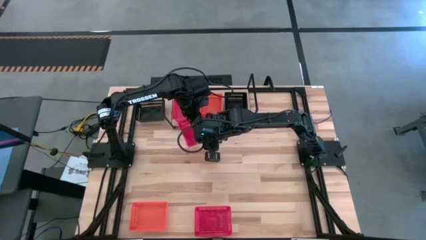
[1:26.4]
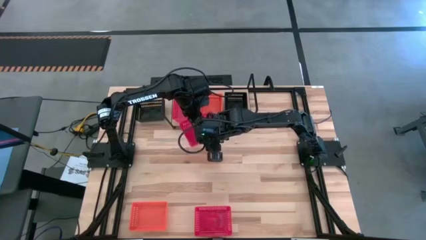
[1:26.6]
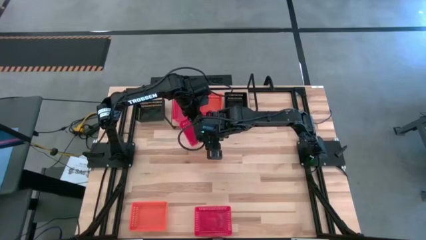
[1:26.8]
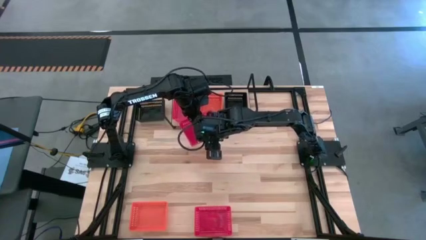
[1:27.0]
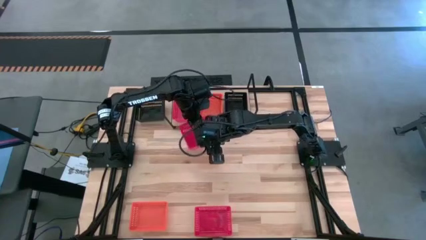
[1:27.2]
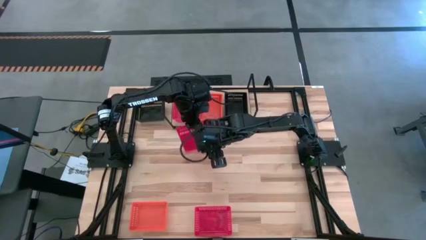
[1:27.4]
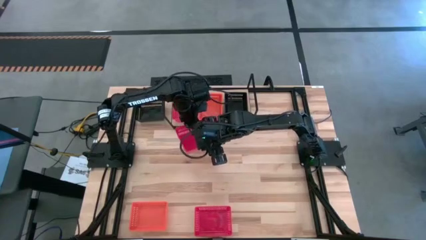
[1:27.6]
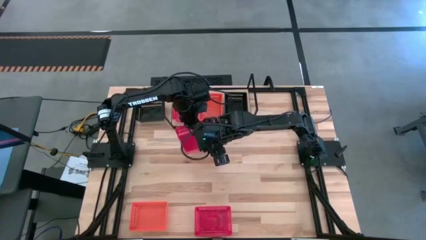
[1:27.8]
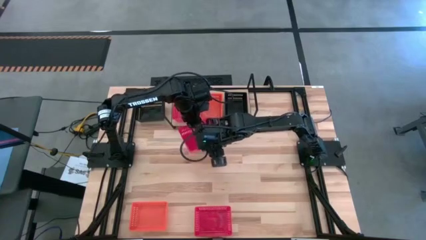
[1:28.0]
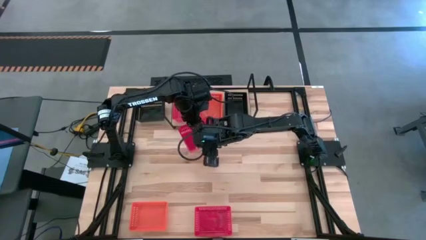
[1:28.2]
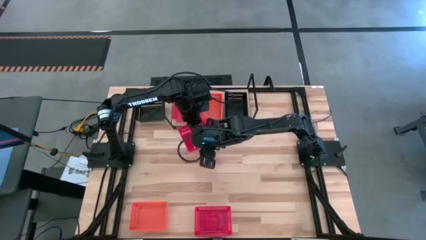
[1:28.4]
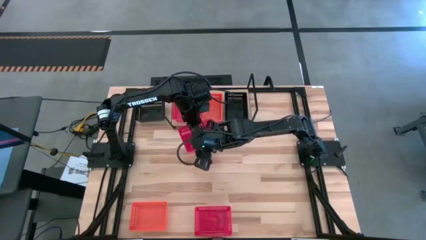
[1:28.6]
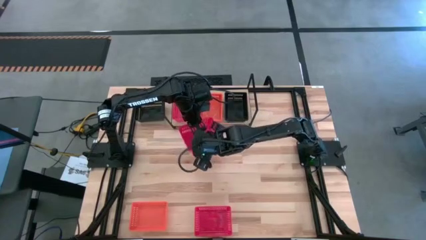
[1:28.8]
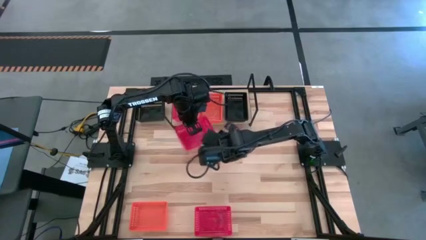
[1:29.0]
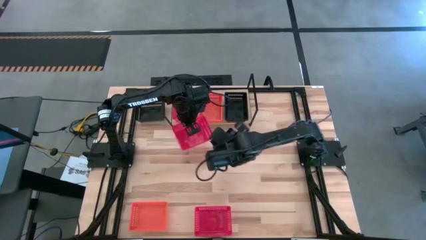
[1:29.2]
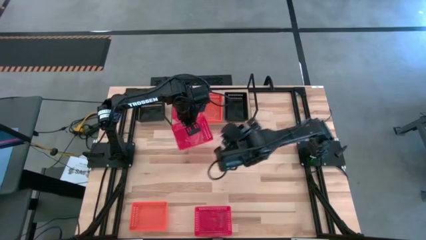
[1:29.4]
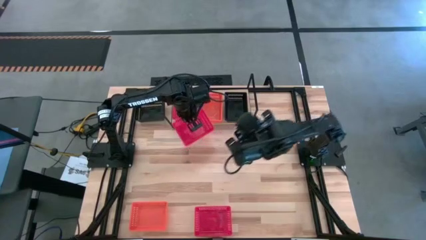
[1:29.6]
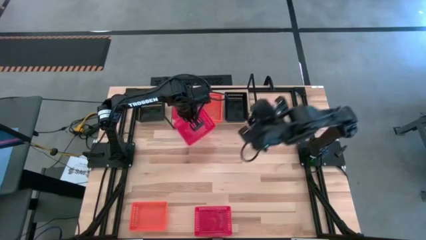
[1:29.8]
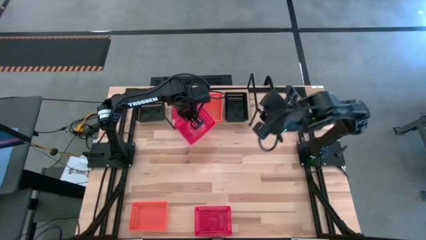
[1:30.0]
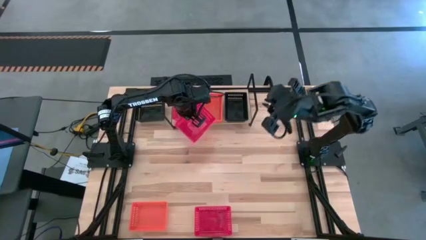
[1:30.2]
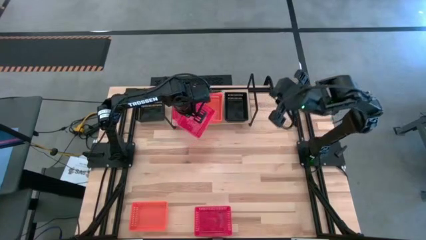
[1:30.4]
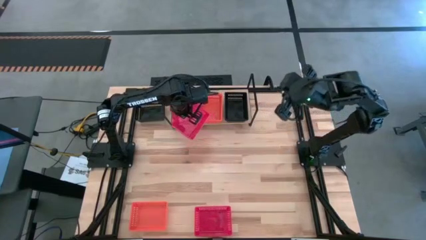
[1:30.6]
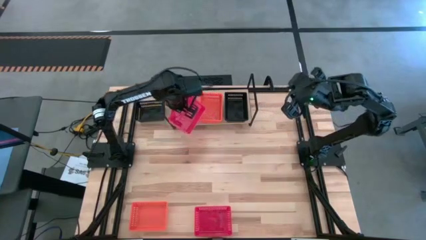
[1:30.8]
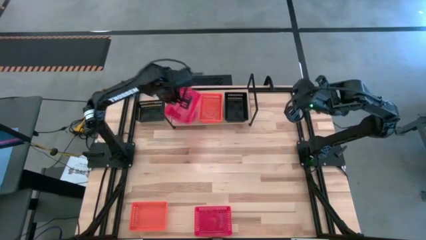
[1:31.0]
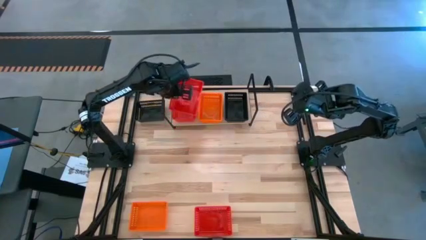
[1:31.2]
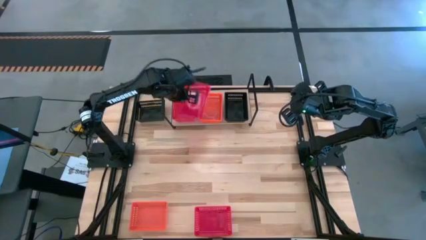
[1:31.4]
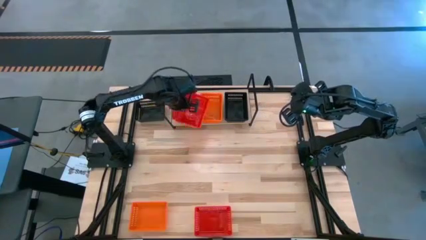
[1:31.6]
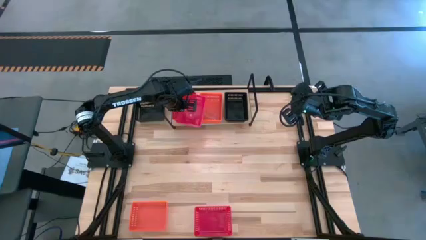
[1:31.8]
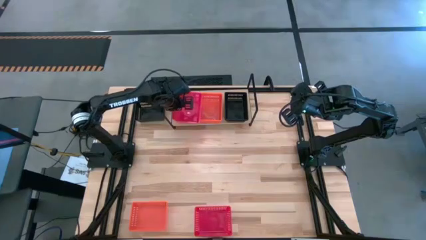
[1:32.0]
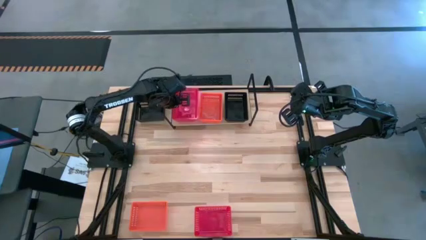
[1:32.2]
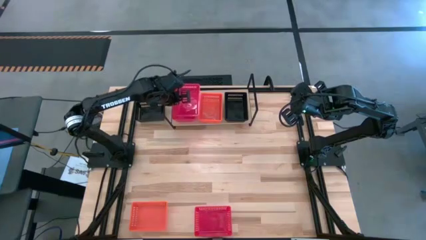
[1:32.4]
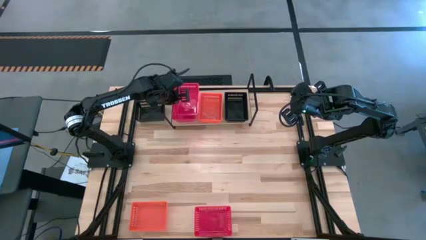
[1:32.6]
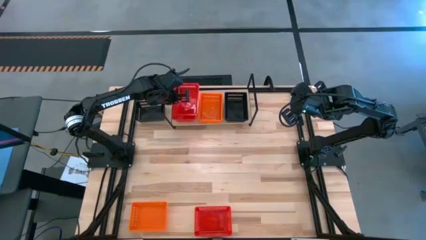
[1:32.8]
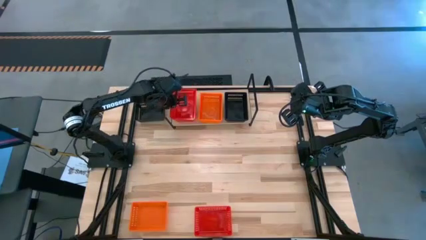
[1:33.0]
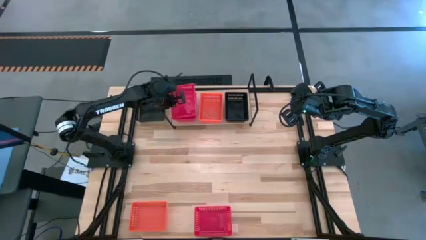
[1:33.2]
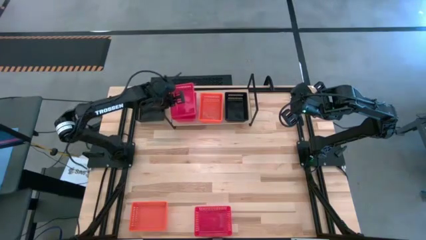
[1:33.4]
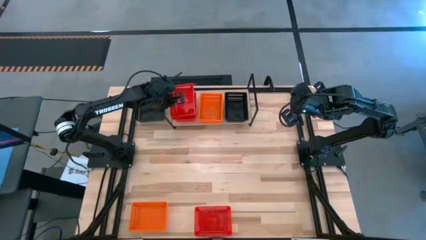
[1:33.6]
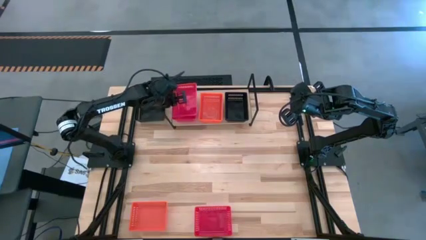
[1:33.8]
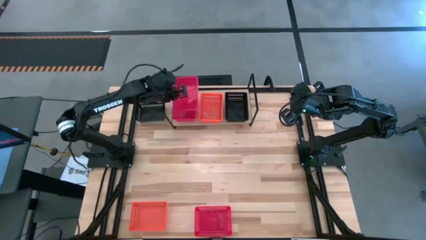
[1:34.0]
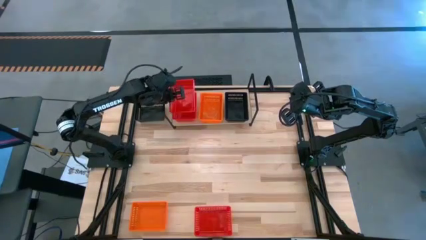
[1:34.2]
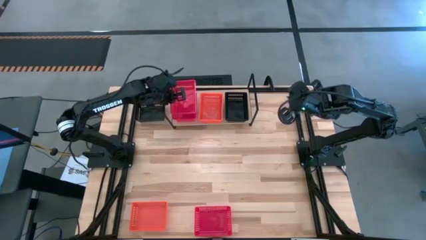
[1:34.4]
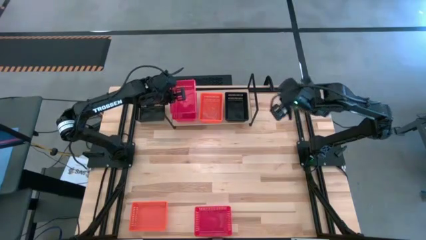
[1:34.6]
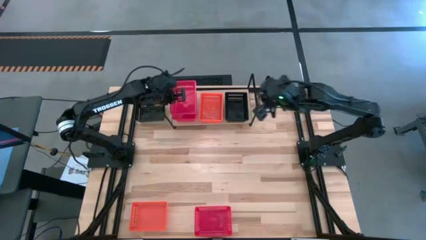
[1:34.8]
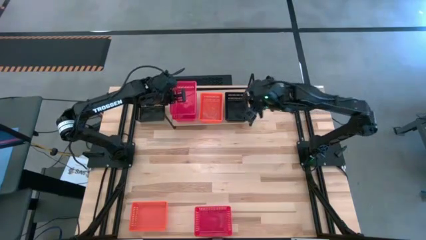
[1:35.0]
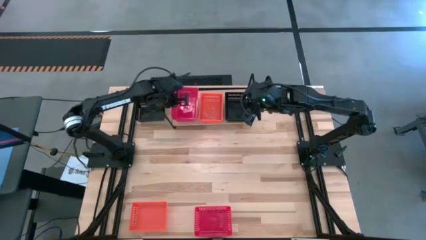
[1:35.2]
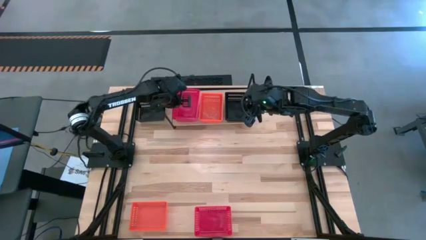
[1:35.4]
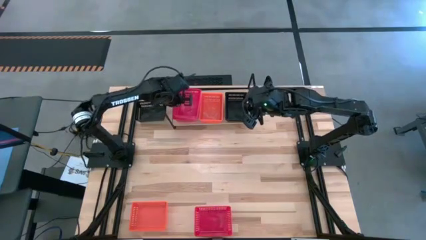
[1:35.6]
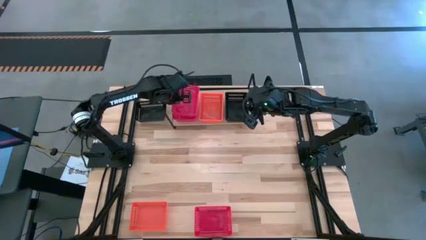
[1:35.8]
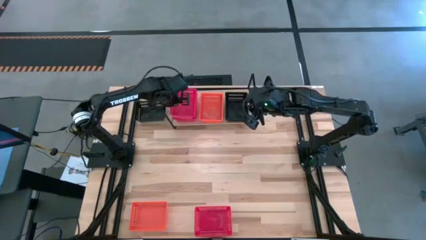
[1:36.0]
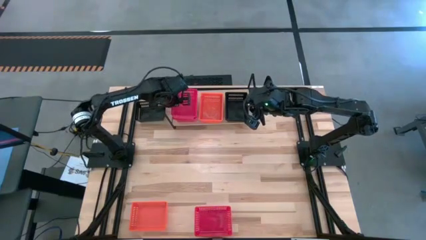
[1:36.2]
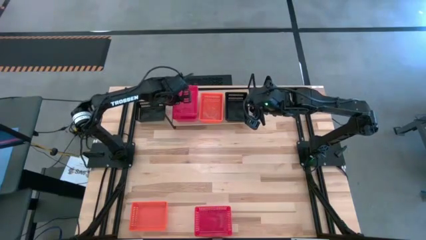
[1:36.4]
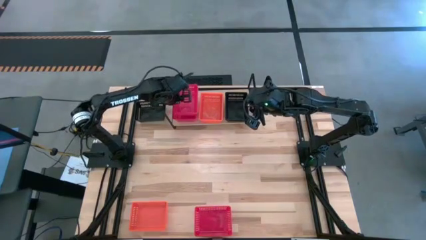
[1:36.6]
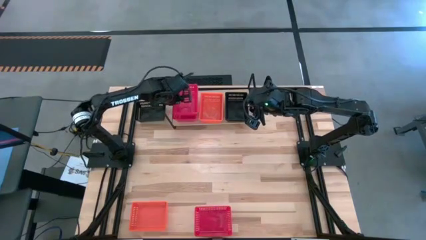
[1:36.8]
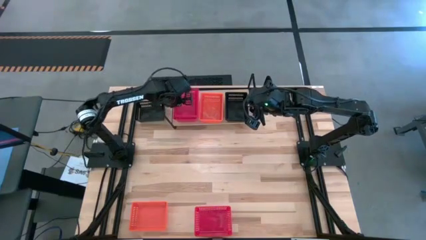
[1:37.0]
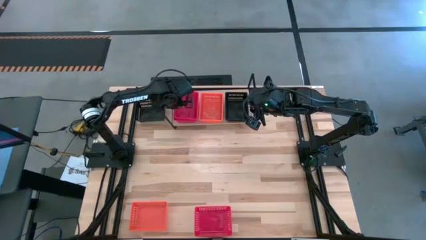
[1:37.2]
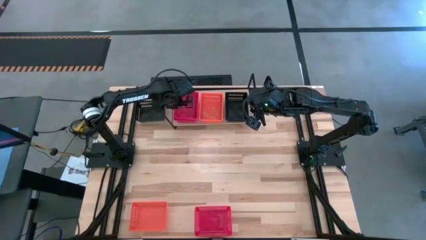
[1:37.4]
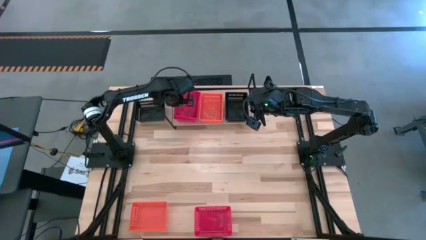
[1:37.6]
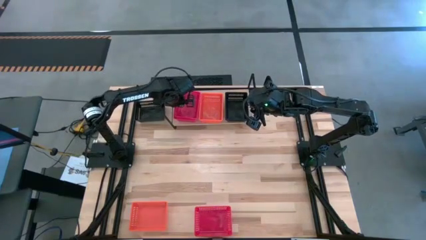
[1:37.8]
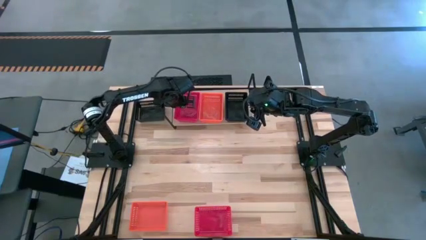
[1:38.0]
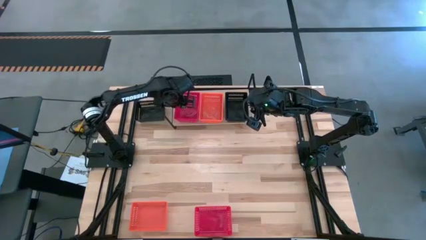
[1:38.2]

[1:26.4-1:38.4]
Task: Stack baskets on shelf by color
Stack the top red bin on top of the red bin on the shelf

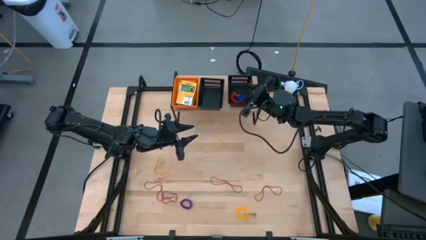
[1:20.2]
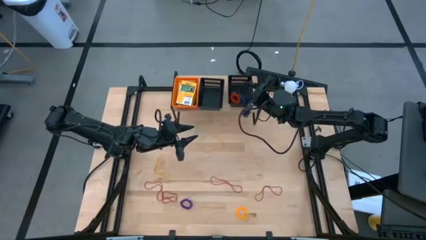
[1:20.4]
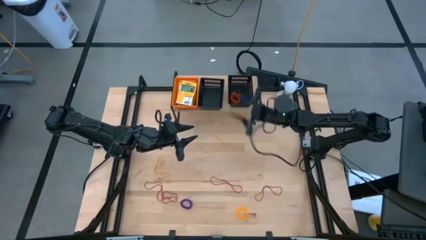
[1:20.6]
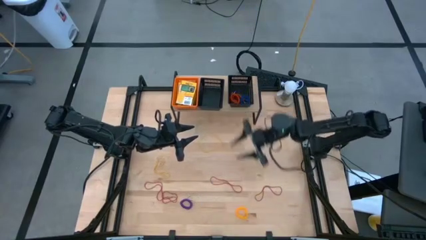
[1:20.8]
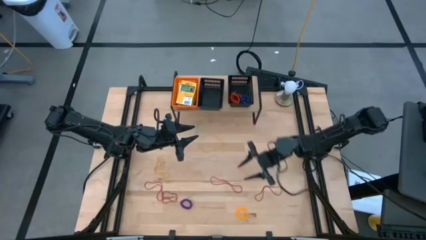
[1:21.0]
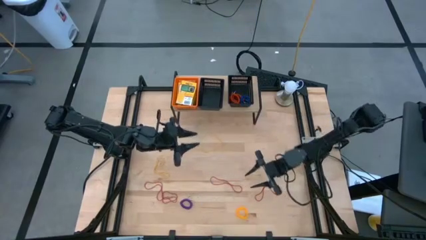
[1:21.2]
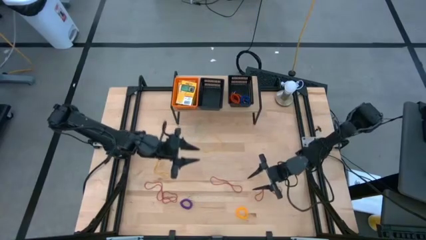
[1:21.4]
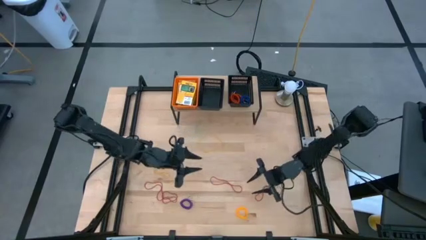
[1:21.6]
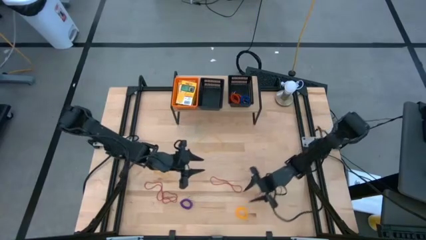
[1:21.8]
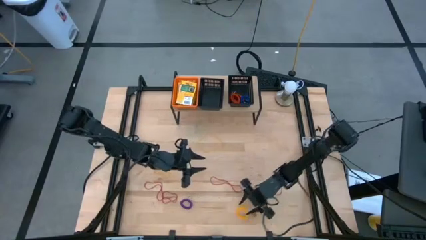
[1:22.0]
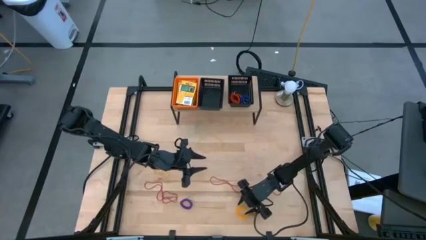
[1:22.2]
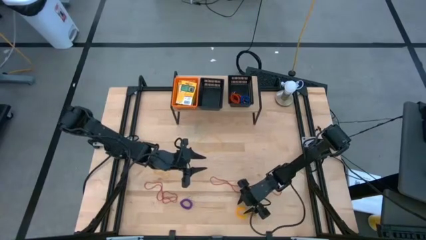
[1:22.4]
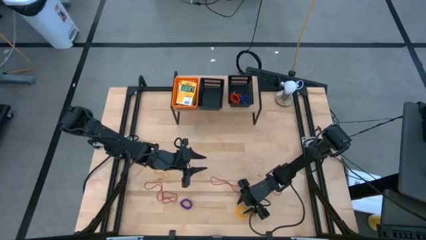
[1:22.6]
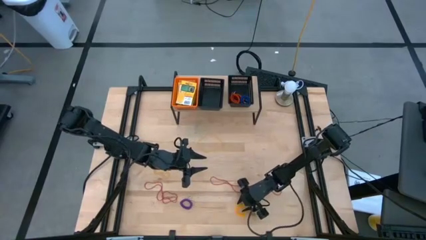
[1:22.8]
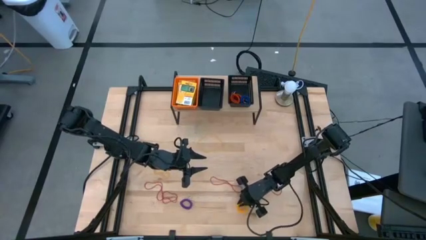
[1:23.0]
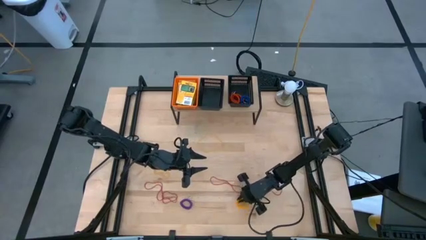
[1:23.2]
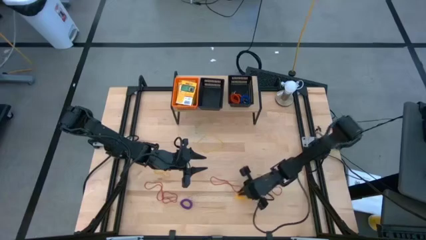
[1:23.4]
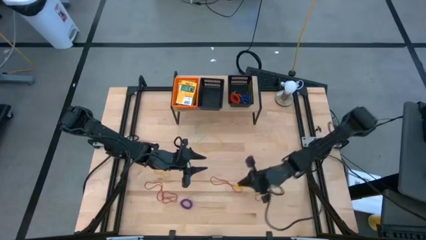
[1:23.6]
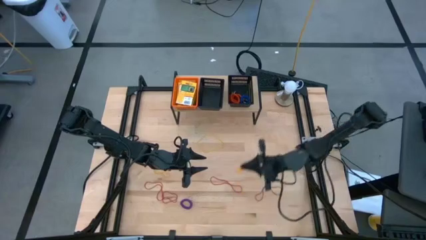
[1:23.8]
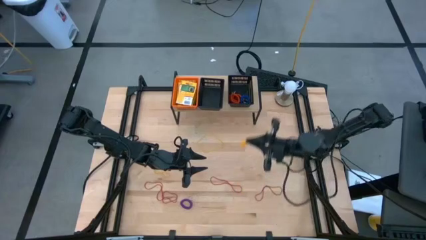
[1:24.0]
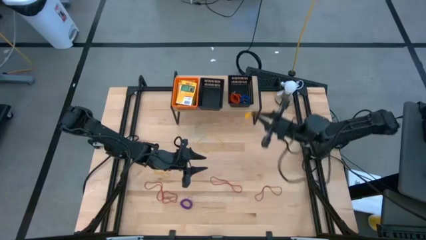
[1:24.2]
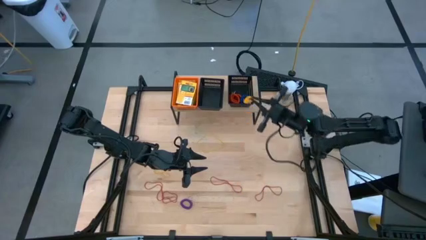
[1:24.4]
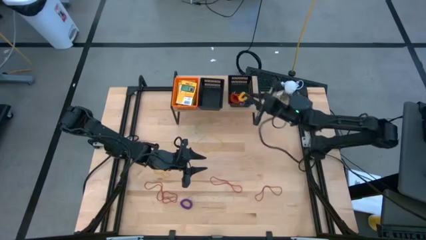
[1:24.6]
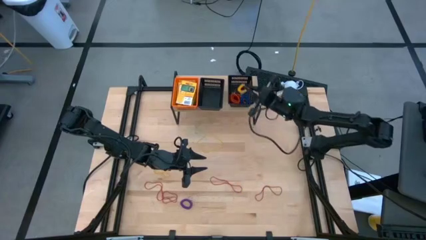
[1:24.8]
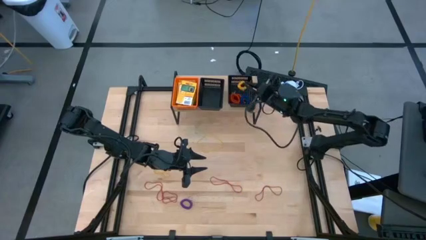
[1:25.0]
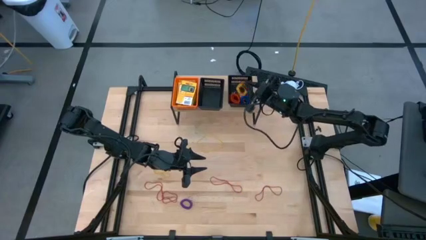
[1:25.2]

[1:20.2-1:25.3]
Task: Pick & Place Office Desk Supplies
Put the yellow spring keychain into the right black bin on the shelf
